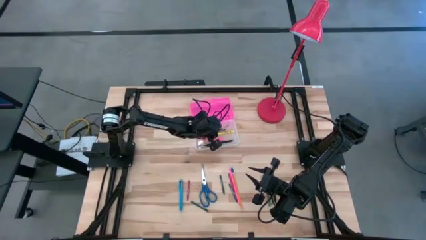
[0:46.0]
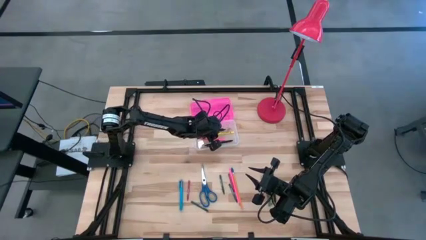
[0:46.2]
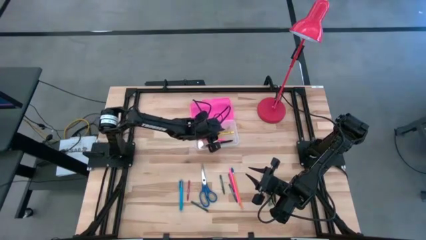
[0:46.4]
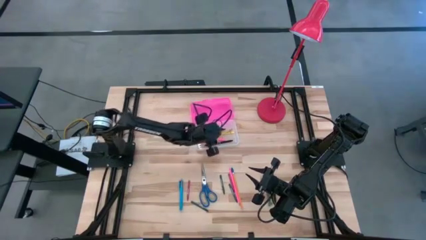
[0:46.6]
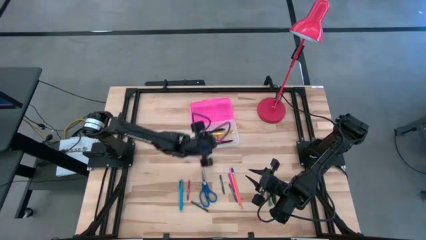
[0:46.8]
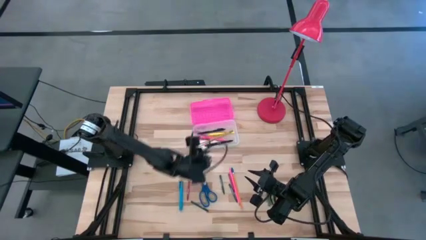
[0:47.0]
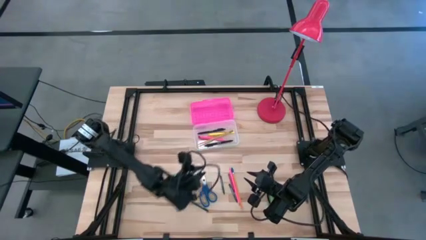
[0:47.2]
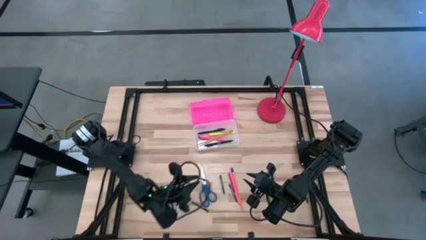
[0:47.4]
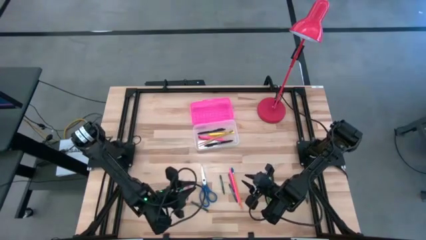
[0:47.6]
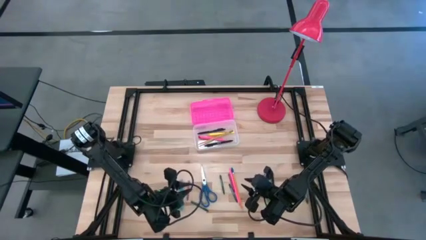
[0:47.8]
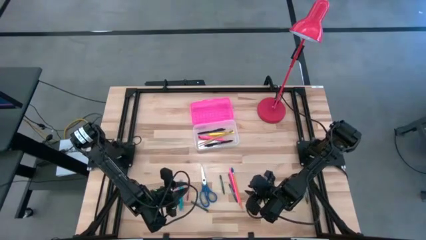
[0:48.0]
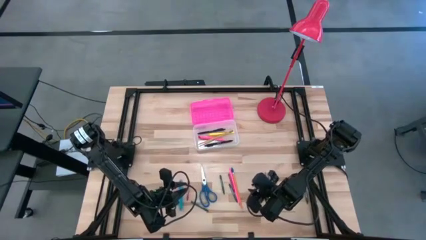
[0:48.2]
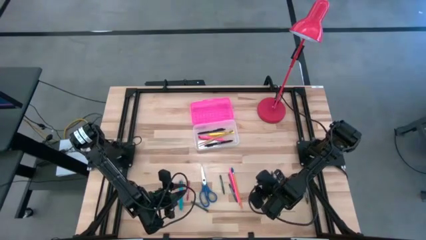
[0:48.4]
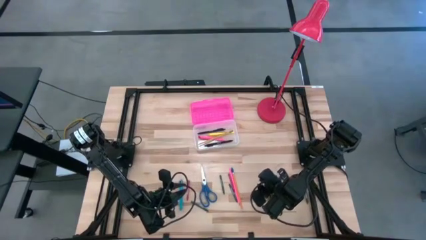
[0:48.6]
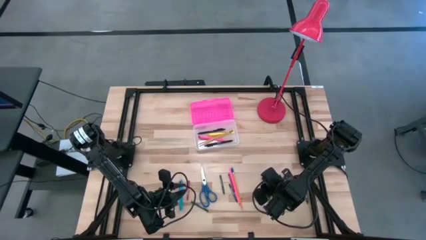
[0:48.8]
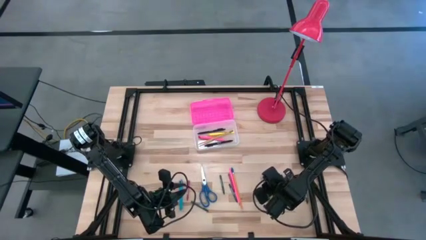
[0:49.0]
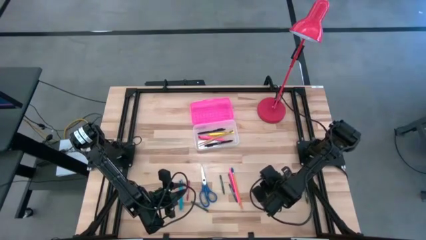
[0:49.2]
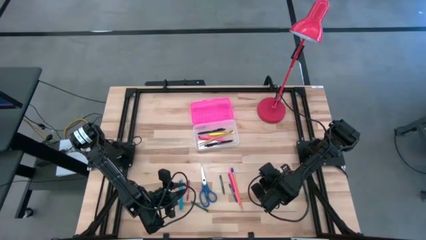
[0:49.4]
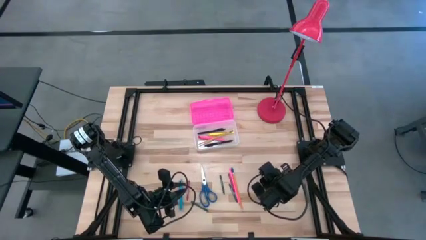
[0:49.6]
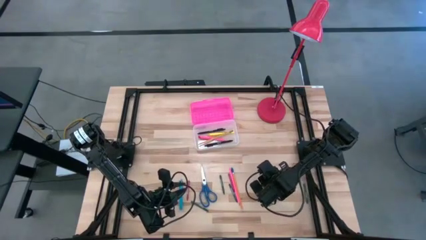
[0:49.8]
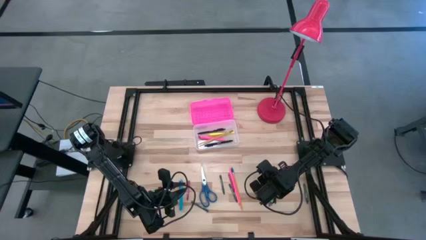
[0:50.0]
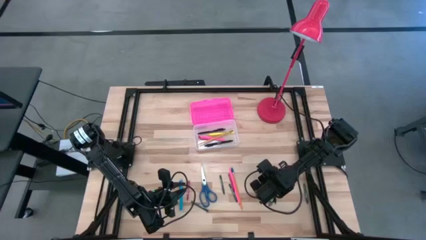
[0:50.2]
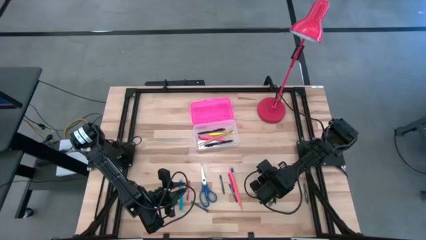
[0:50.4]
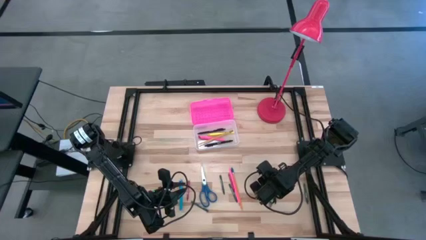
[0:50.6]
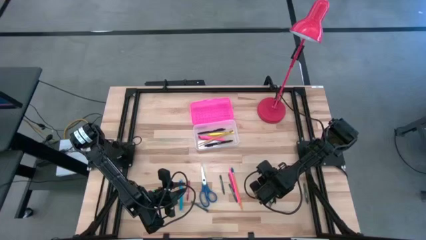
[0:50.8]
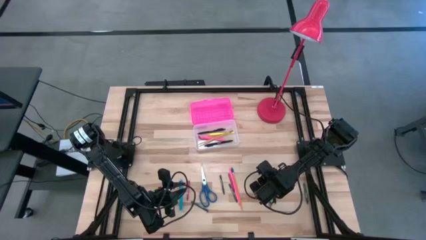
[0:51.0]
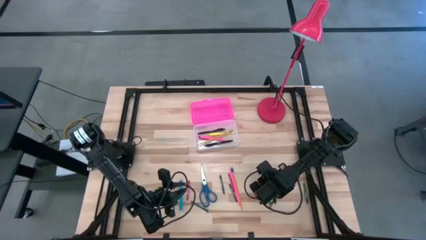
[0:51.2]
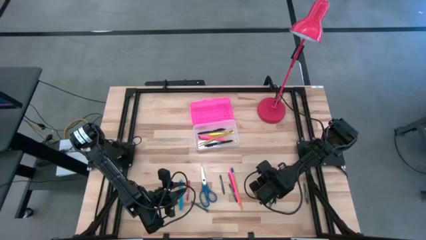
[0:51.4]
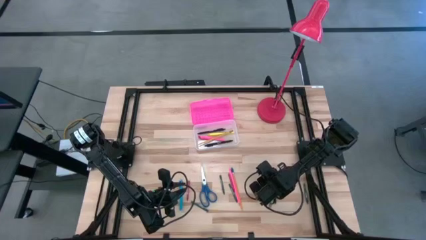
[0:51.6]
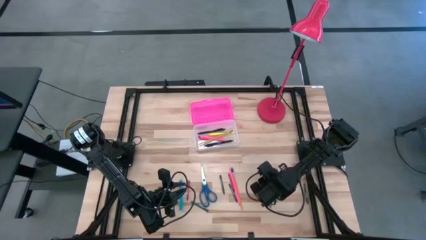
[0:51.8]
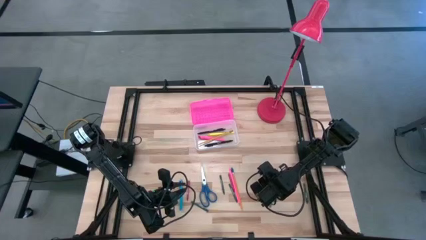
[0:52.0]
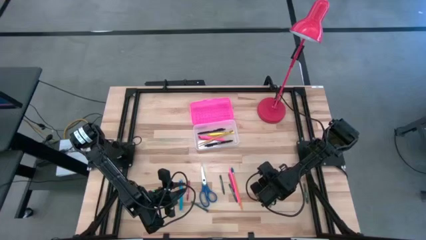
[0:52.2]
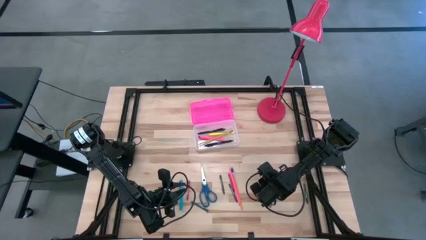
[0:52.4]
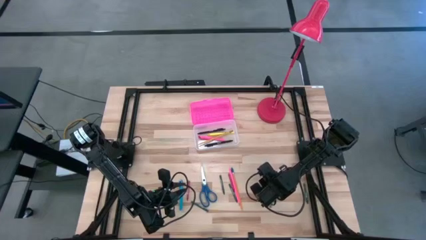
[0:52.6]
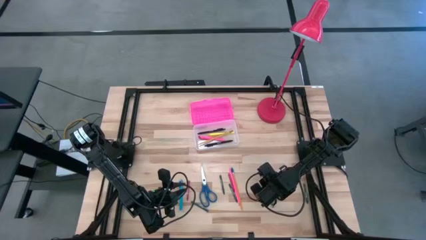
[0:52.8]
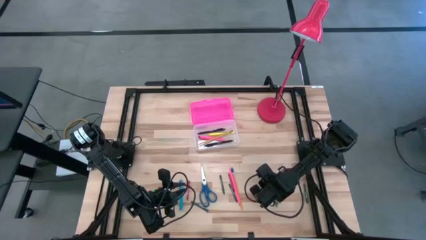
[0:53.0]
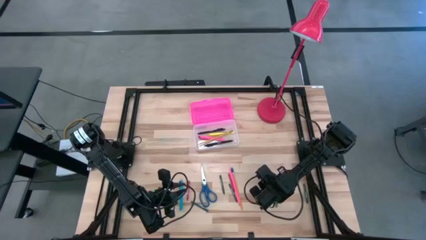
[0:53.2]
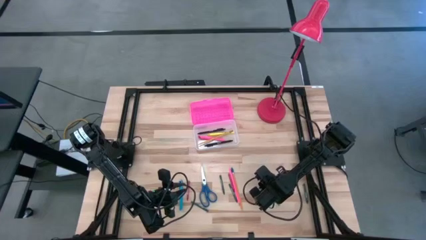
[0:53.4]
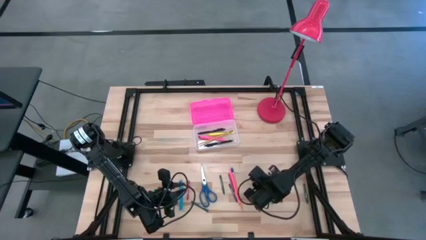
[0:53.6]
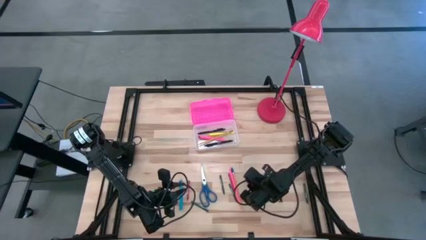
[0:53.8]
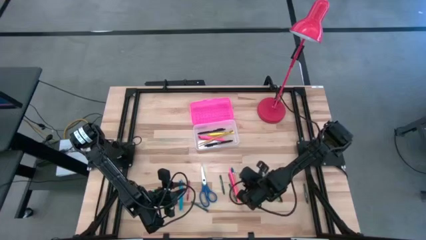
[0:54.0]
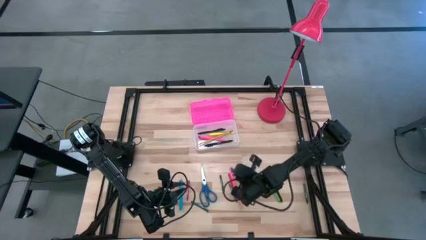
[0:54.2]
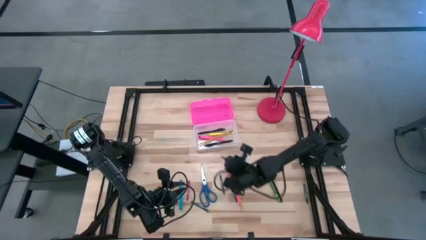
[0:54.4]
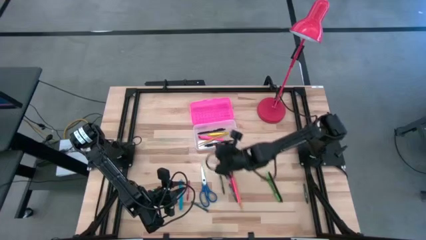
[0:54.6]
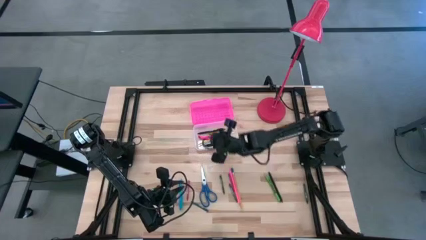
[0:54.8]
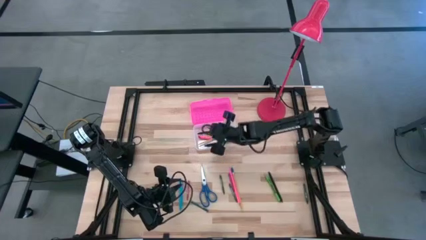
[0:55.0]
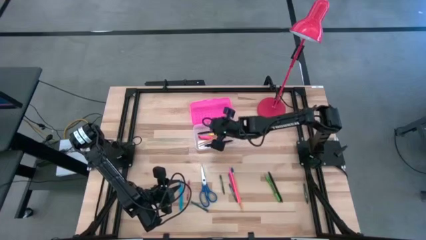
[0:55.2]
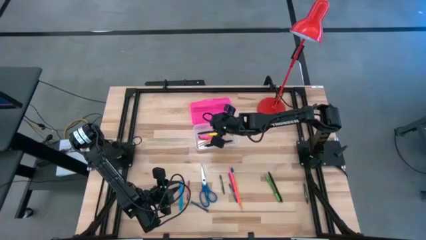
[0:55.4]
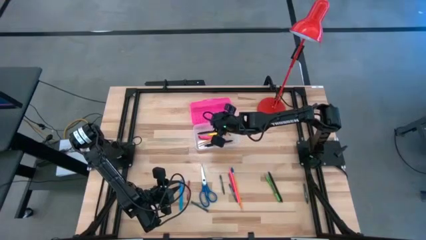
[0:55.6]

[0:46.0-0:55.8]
Task: Pick & place school supplies into a supply box
Put the gray pen into the pink supply box

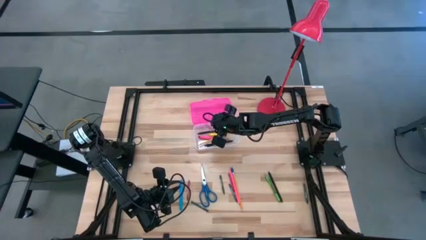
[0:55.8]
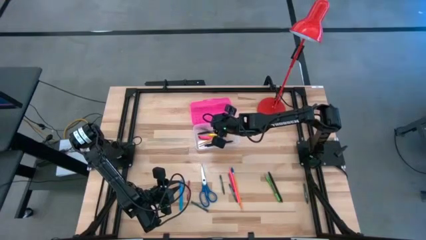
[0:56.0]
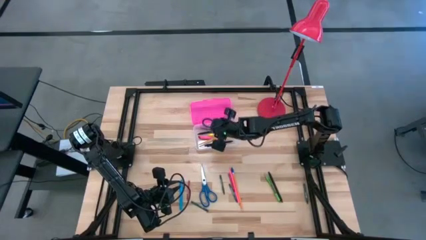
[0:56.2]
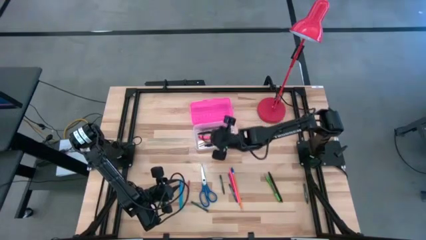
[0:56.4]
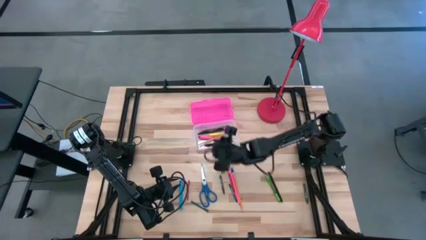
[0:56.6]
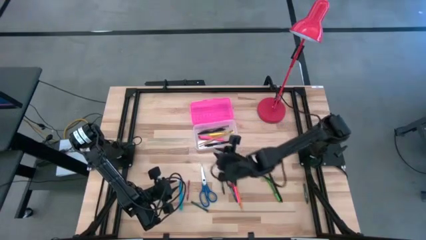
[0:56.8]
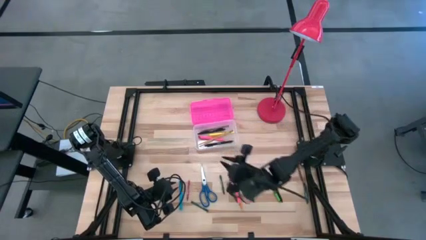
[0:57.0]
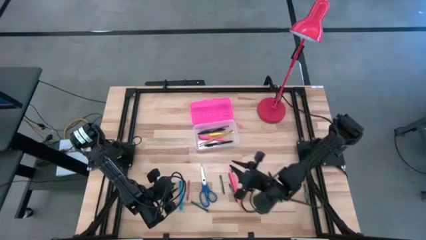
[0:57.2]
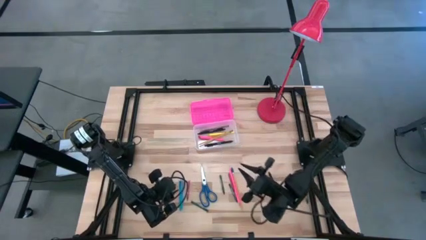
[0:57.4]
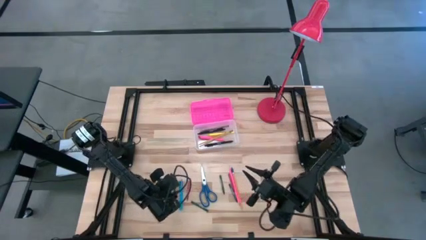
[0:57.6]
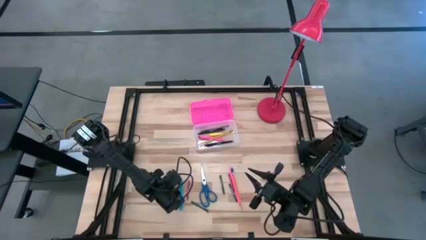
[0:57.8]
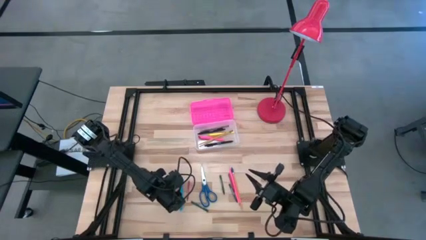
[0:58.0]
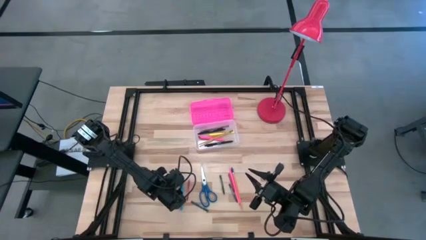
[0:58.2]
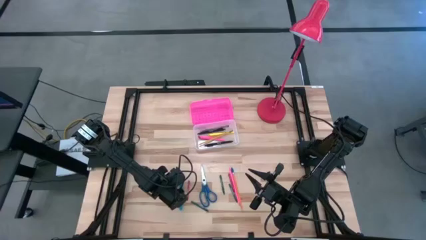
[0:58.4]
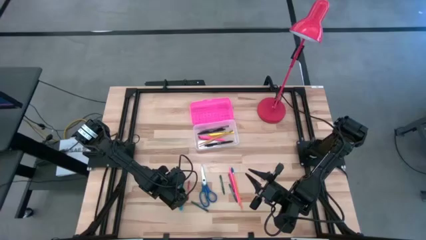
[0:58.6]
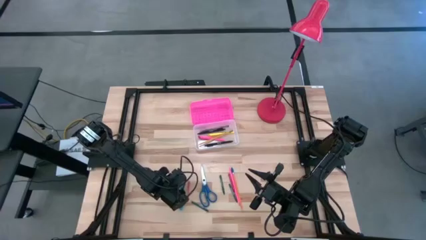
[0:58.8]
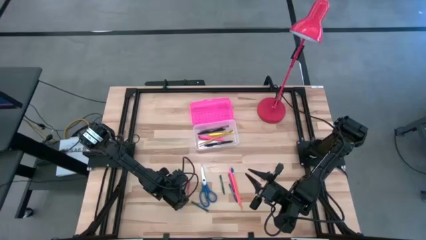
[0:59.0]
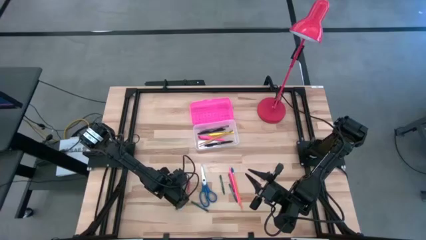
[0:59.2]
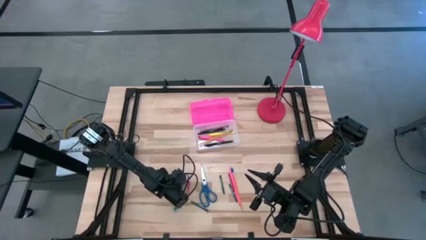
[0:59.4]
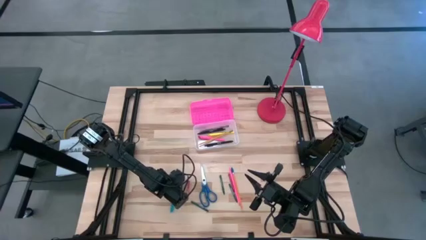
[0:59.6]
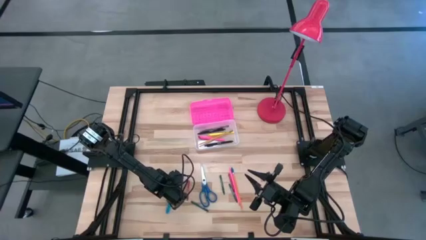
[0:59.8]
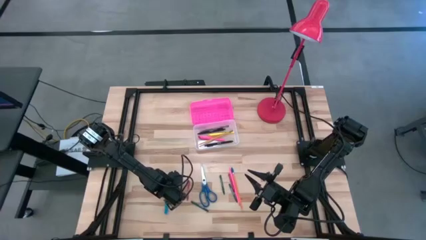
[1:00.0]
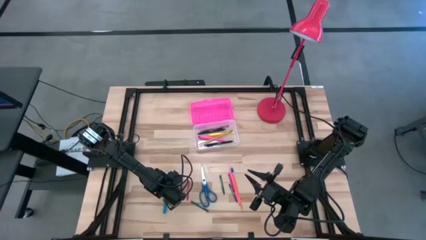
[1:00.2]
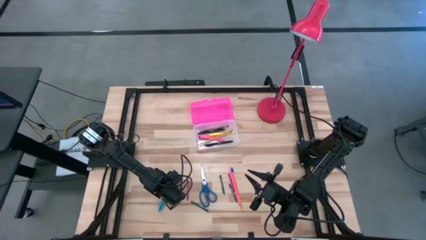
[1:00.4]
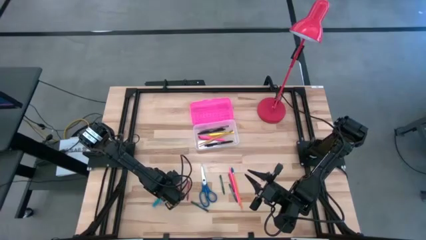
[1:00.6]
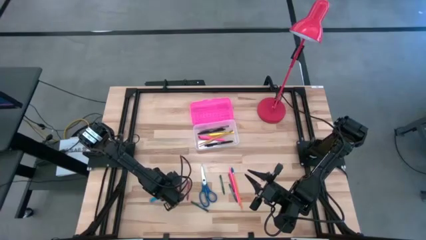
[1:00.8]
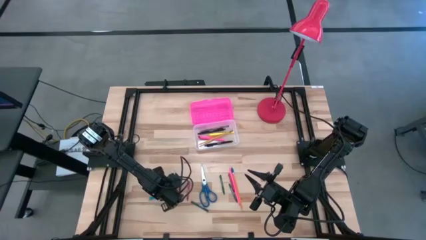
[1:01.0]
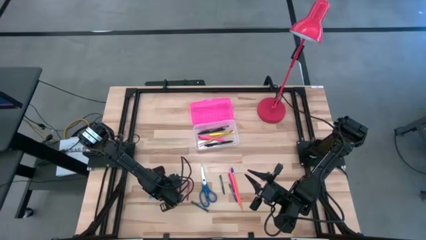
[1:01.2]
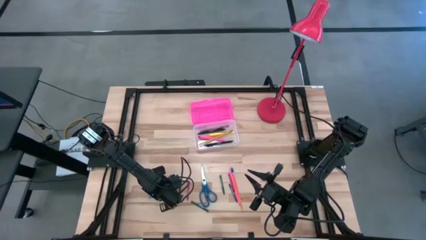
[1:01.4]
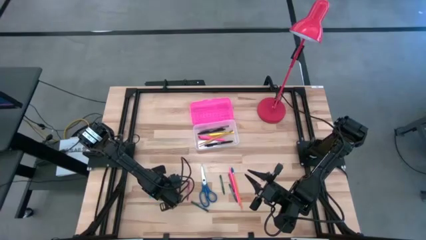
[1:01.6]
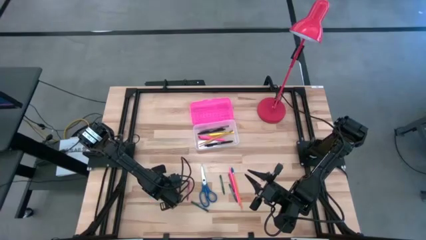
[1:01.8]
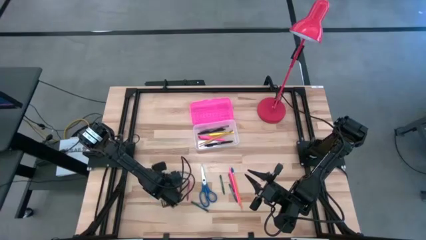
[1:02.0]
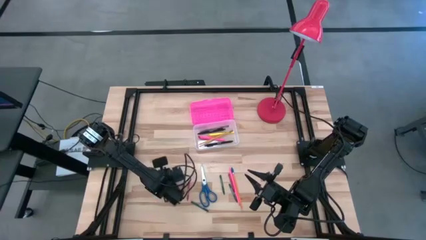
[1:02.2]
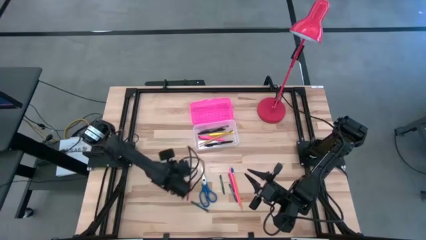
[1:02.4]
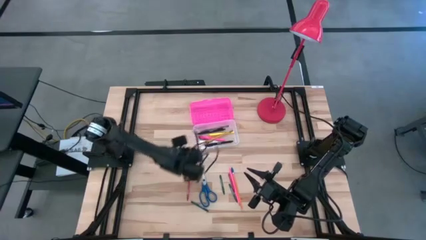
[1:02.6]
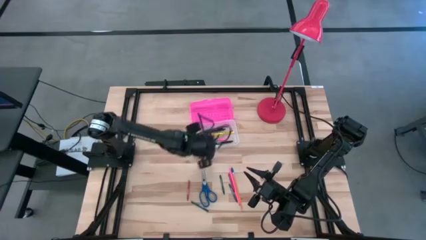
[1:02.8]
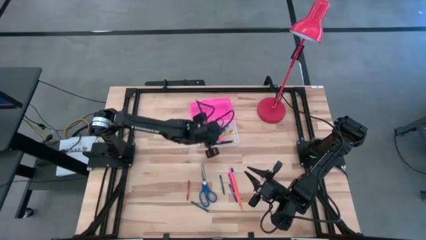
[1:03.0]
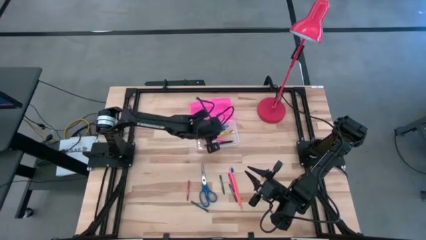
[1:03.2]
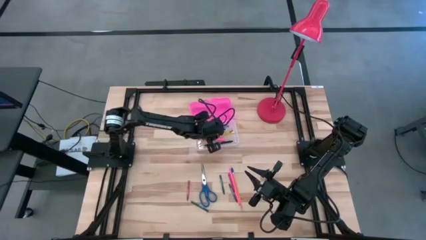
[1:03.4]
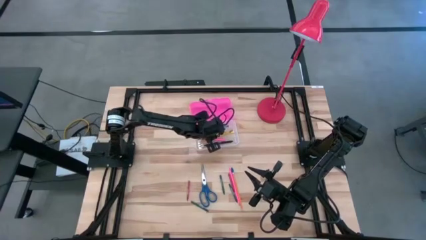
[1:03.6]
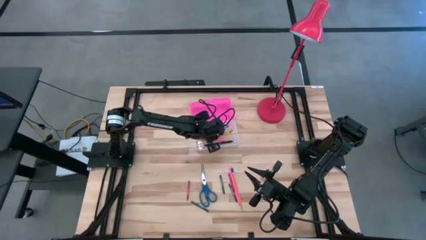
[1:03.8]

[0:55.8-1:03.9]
Put the blue pen into the pink supply box
